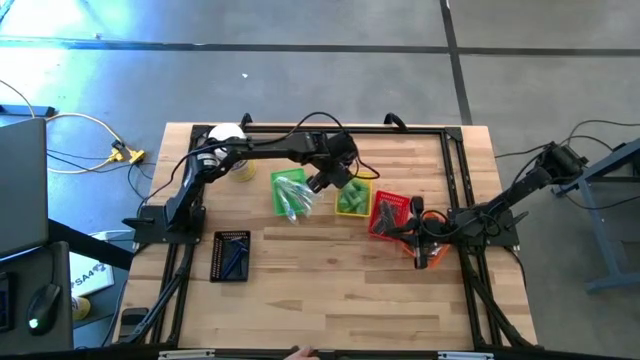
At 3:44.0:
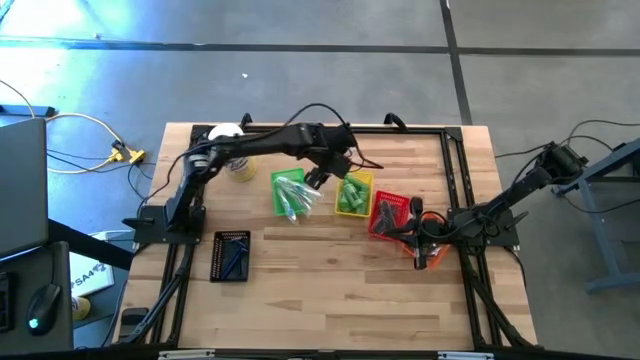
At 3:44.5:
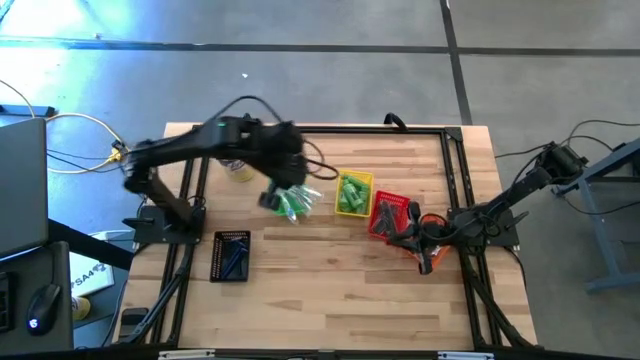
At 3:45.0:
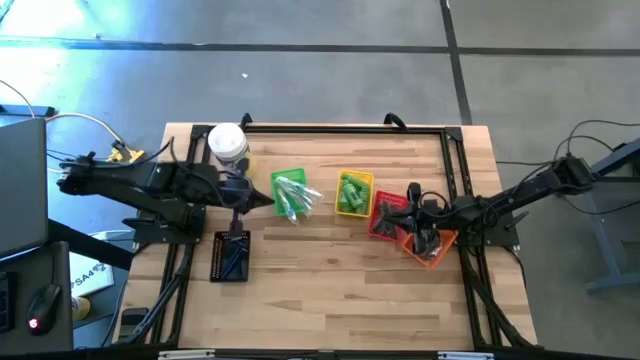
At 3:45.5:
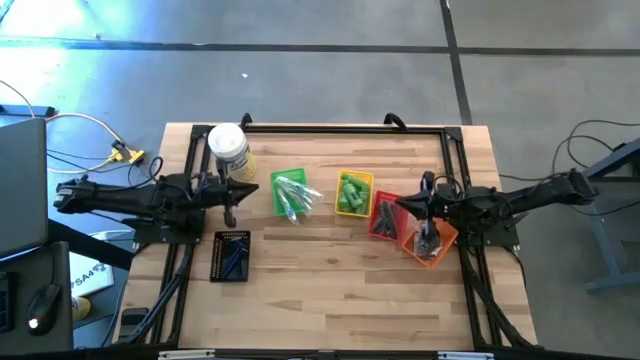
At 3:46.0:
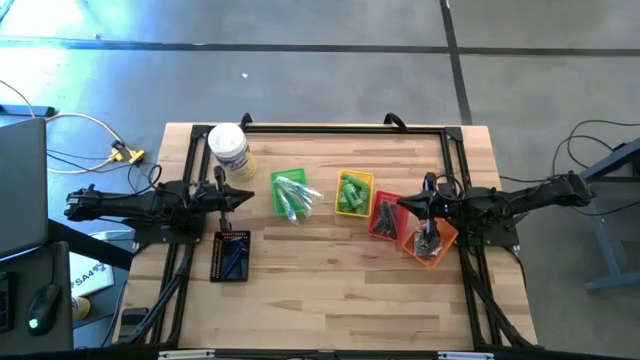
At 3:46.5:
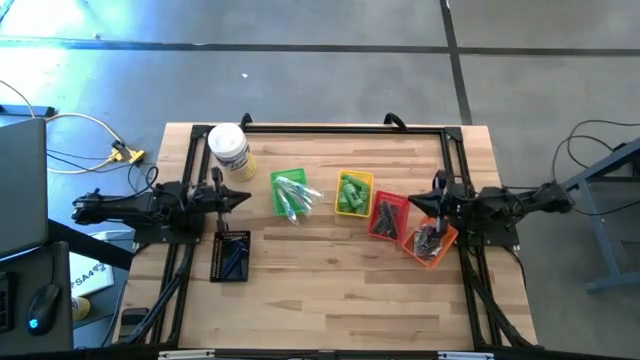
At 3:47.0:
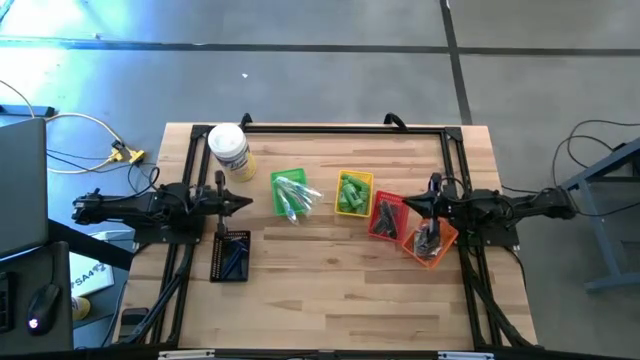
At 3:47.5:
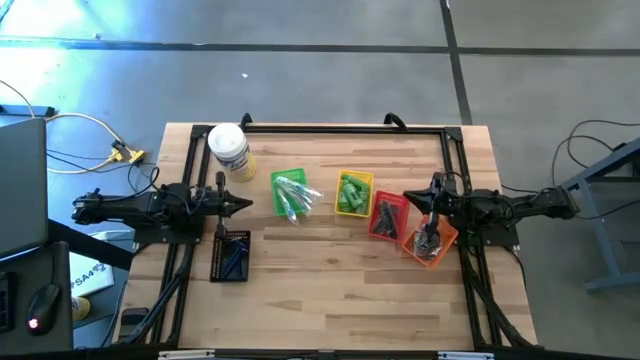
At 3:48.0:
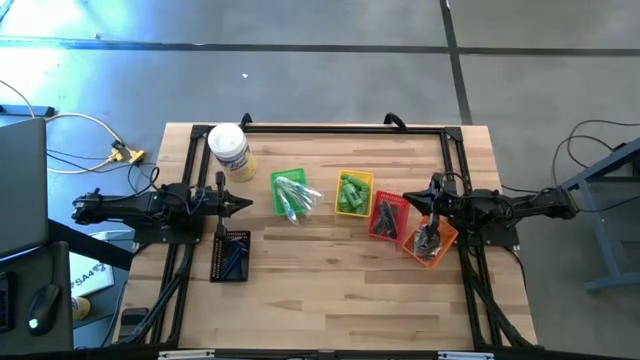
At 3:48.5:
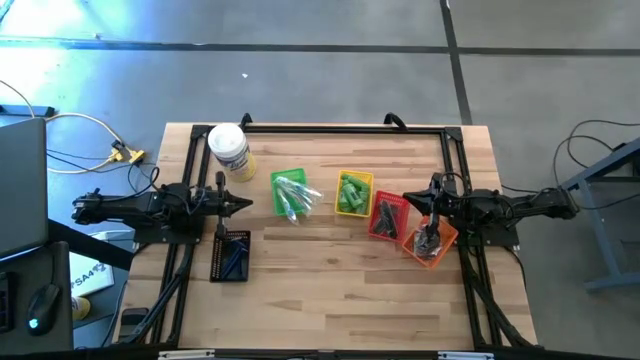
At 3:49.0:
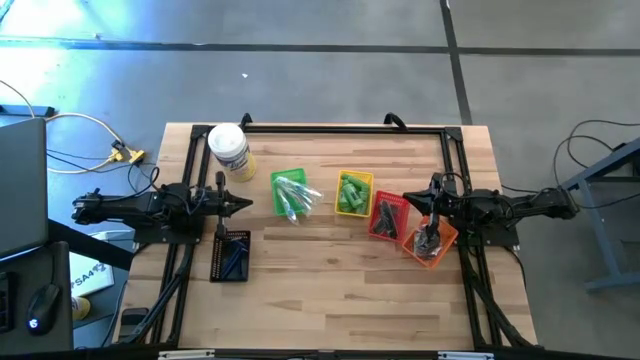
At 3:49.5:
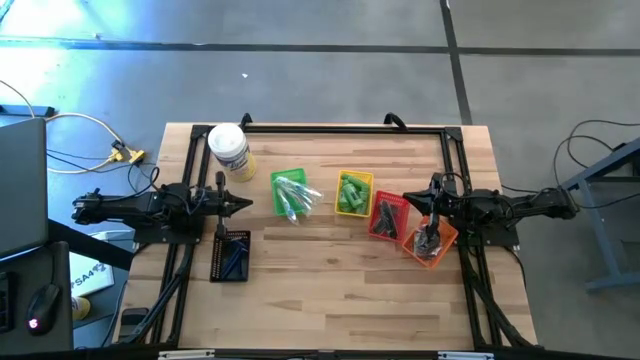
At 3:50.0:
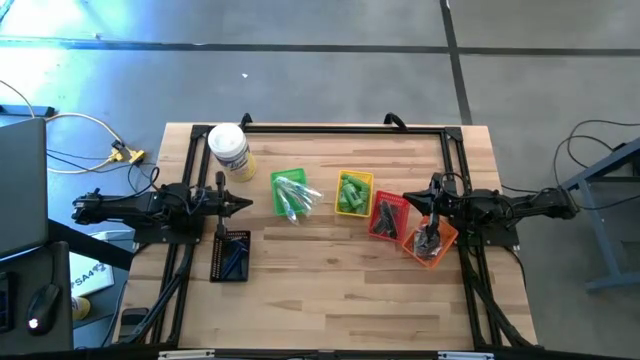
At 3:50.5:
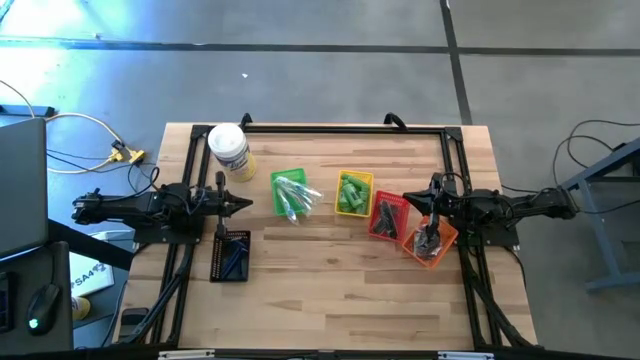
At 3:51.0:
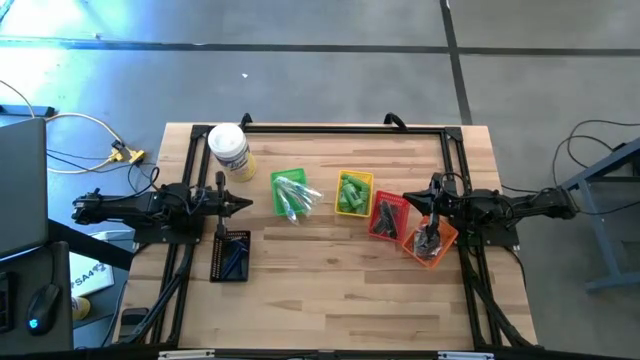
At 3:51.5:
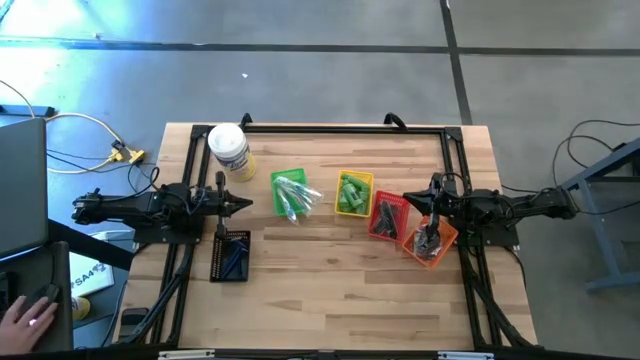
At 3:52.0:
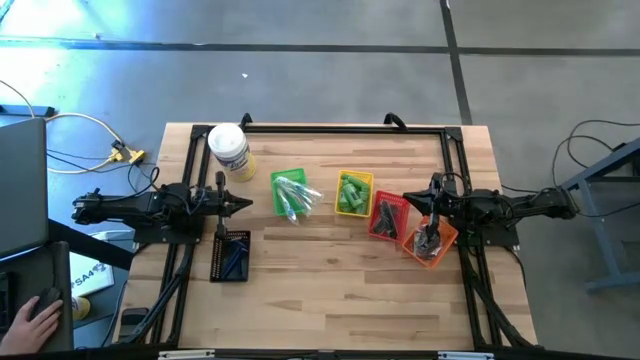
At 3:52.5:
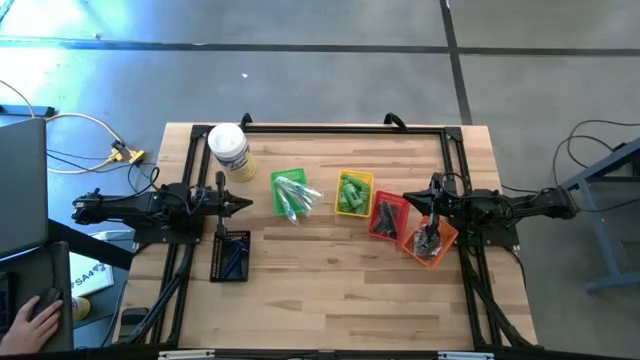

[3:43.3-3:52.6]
Task: Pick & Place Travel size toiletries
Return to Home Position

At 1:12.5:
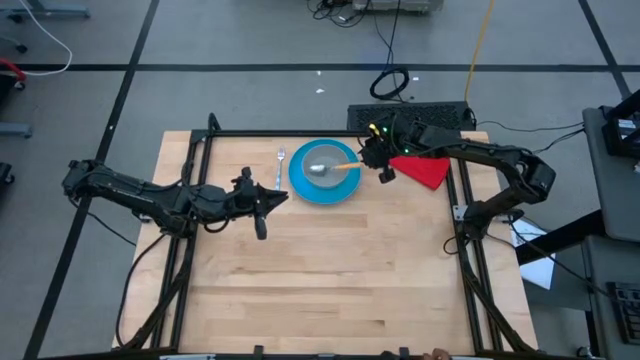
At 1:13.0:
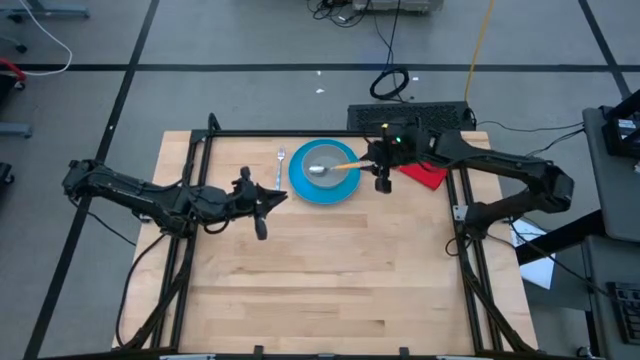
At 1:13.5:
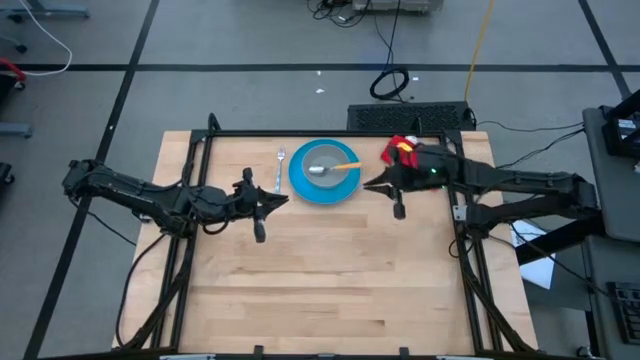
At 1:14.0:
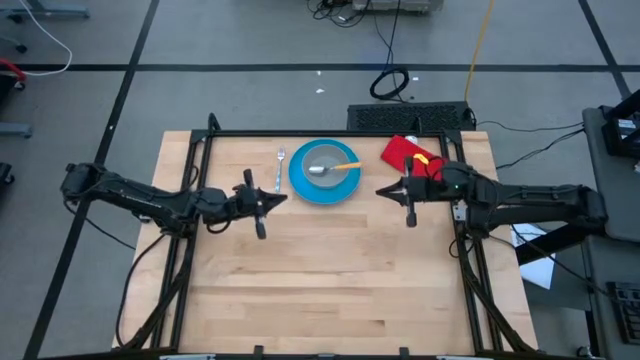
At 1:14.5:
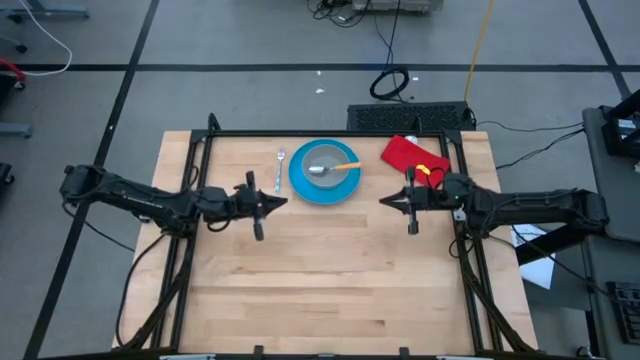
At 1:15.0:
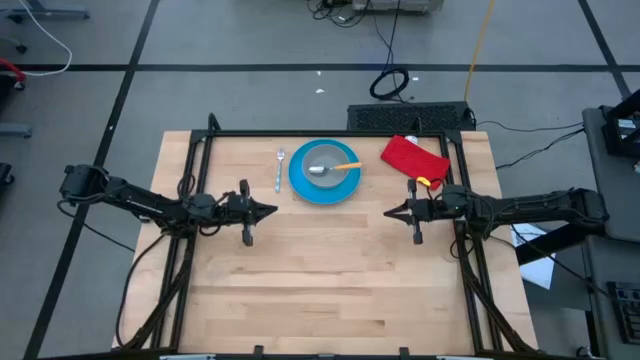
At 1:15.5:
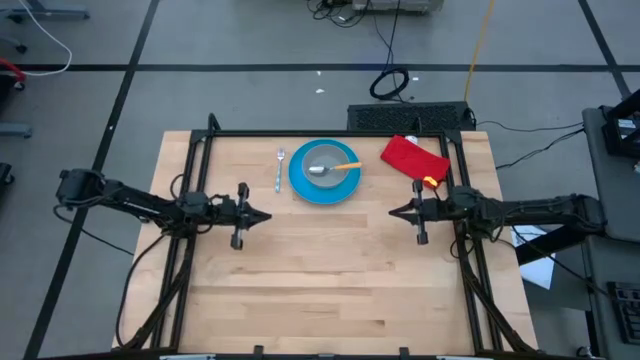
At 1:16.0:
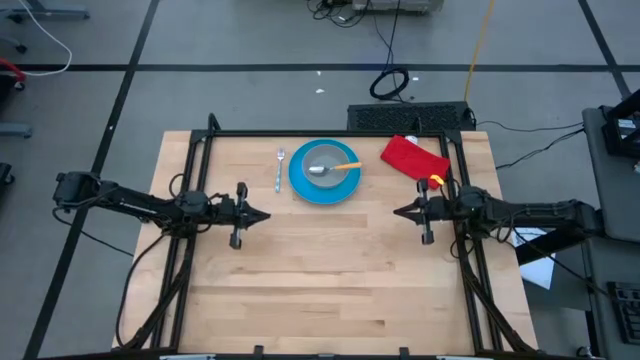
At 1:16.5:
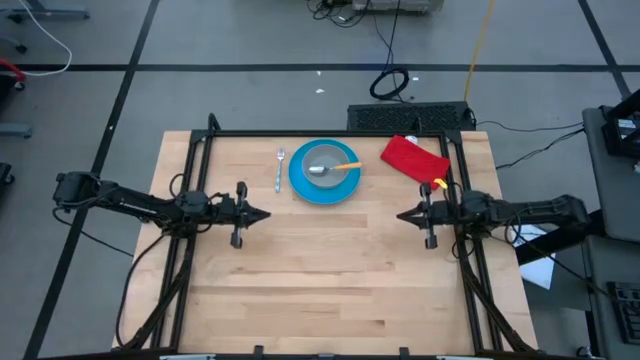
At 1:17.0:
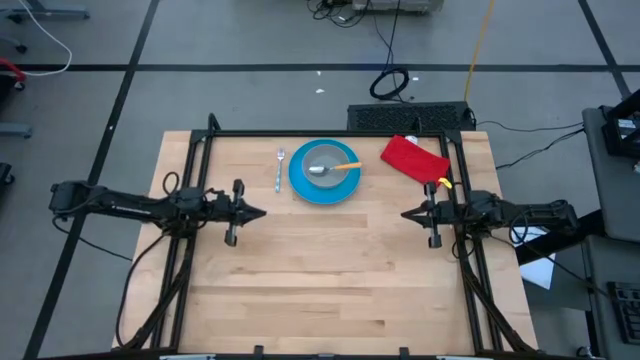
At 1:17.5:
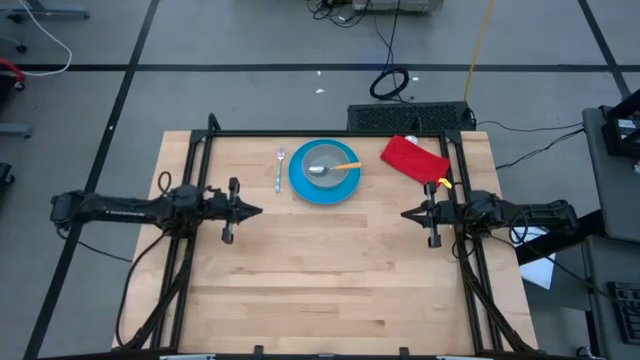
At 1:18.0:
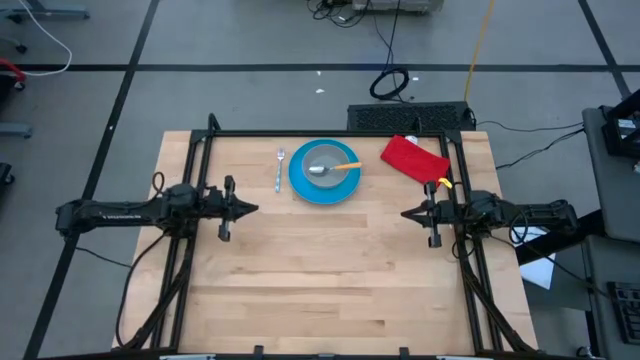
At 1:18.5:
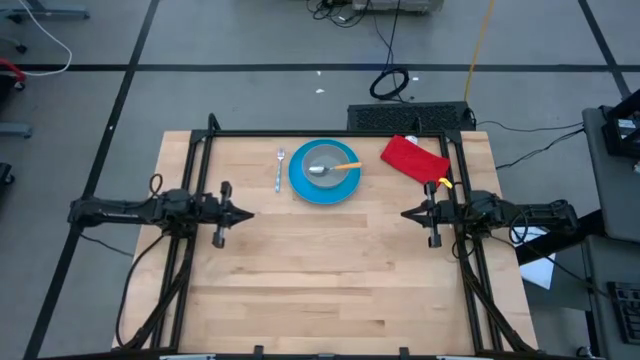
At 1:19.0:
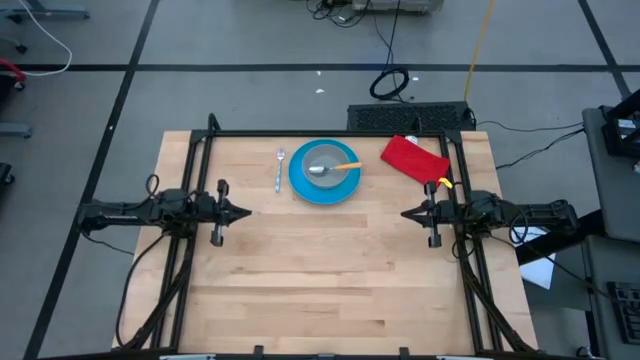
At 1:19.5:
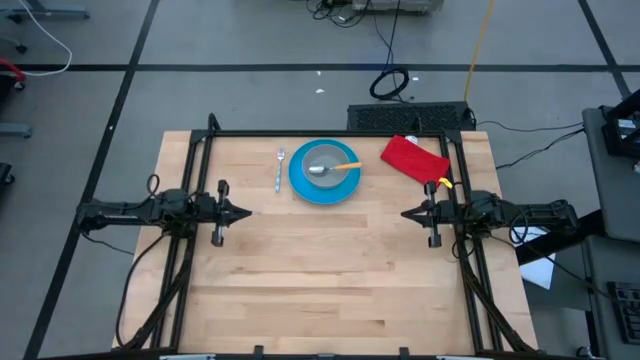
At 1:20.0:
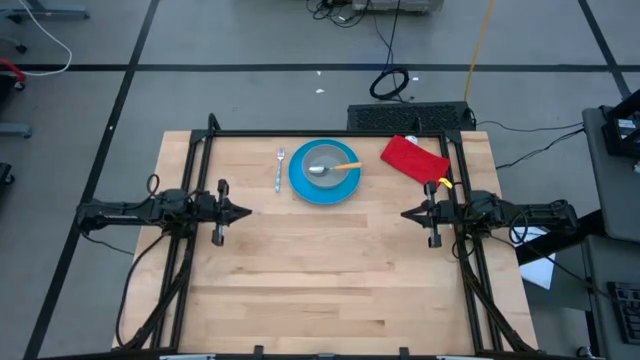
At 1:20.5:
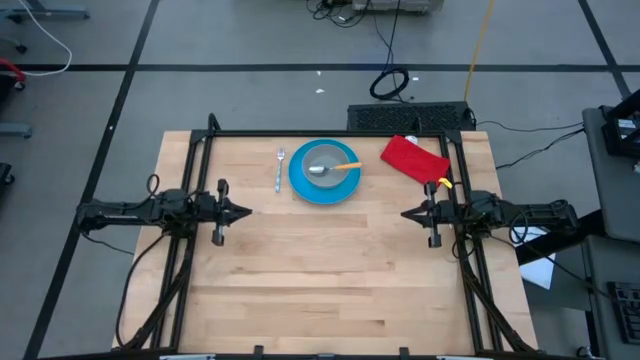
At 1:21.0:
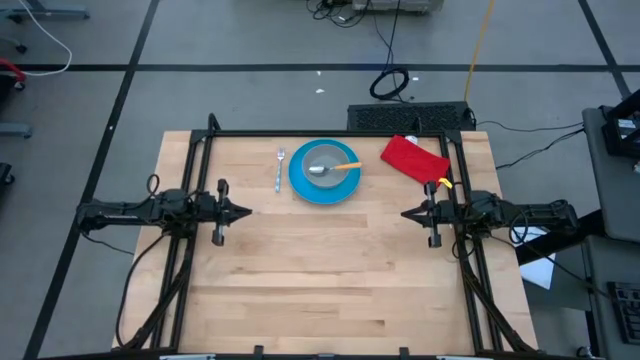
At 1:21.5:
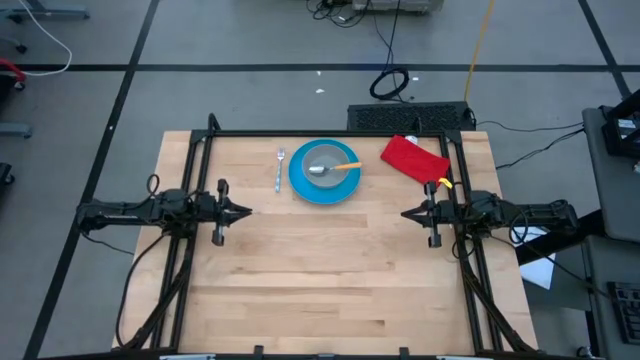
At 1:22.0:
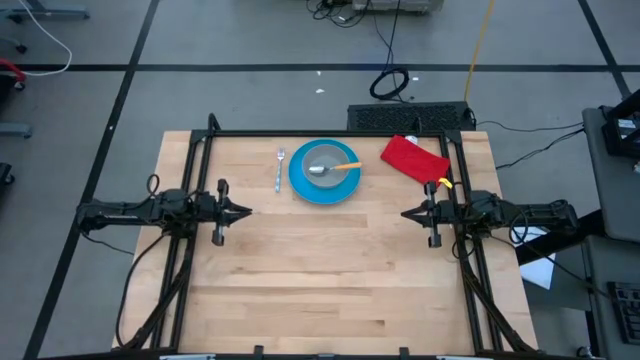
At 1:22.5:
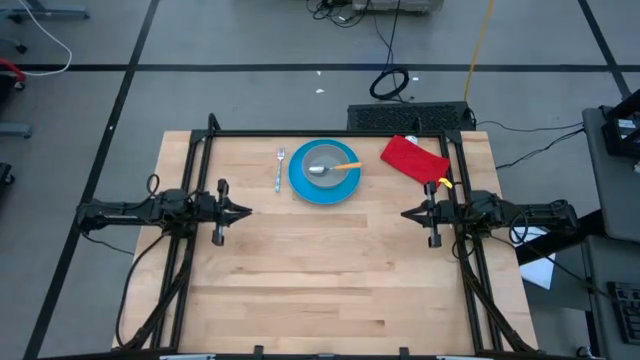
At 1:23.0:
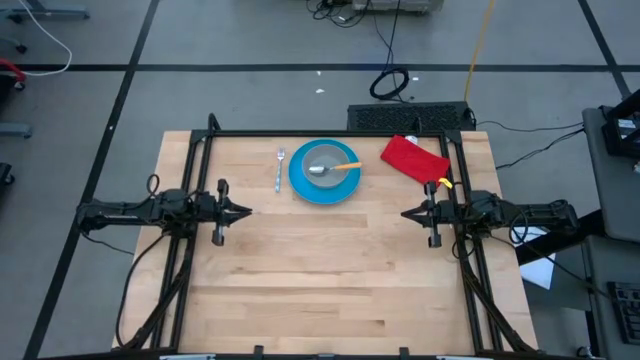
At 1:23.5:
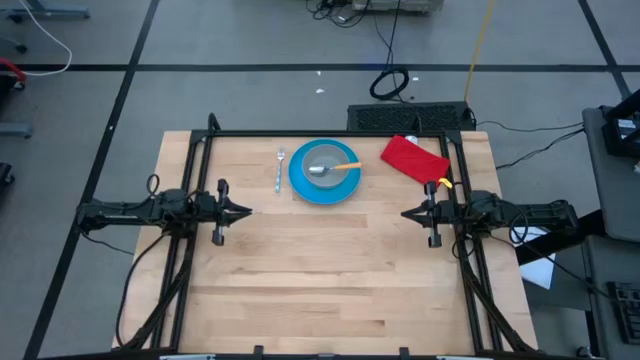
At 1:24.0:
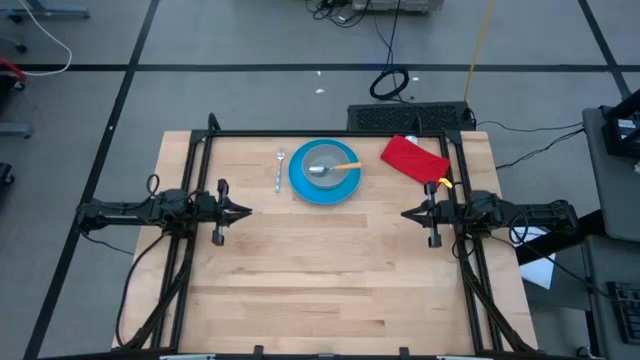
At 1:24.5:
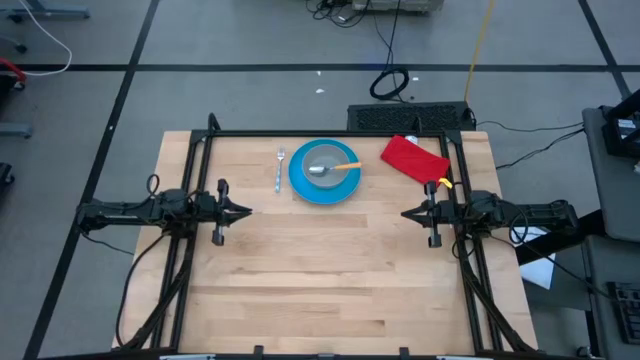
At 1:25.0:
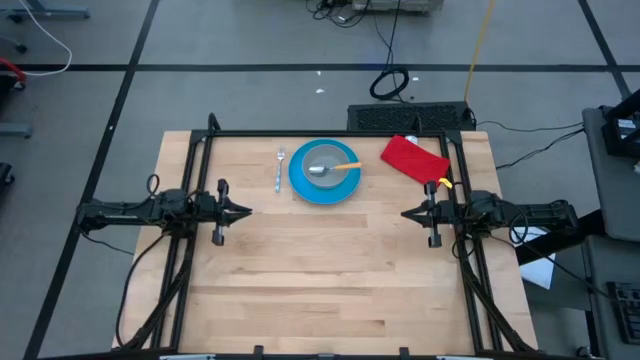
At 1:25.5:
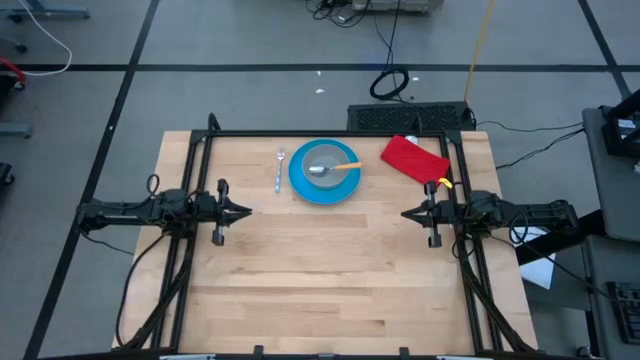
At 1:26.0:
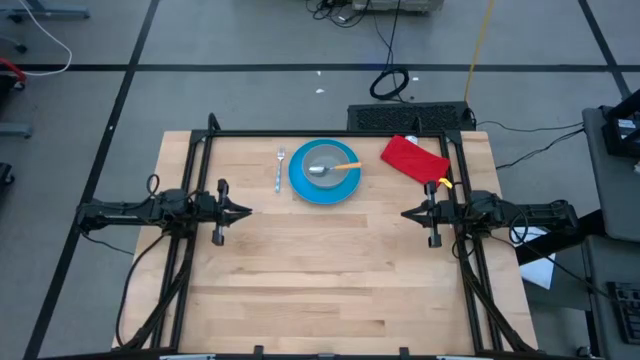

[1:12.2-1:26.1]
Task: Pick and place plate/cup/fork/spoon on tray
Return to Home Position
